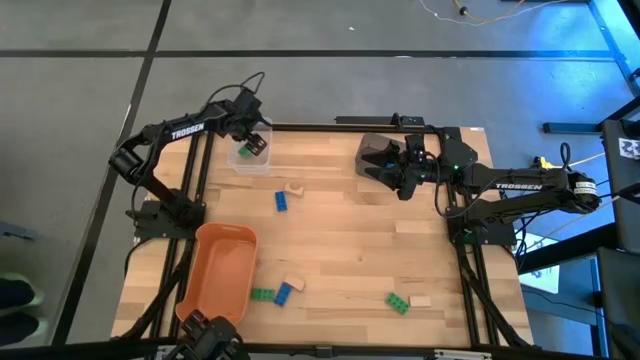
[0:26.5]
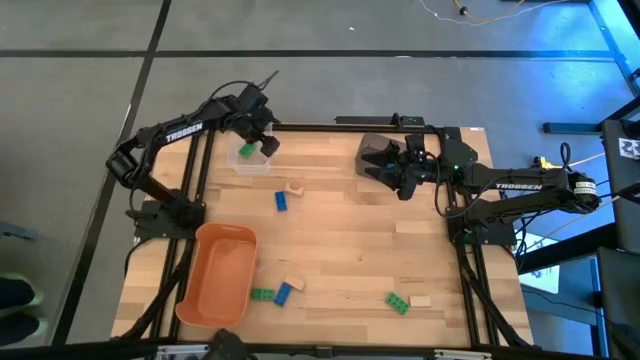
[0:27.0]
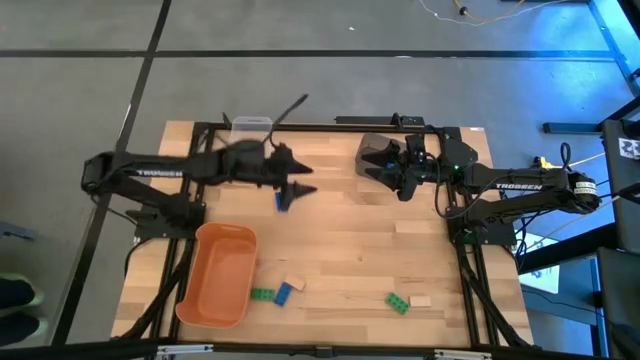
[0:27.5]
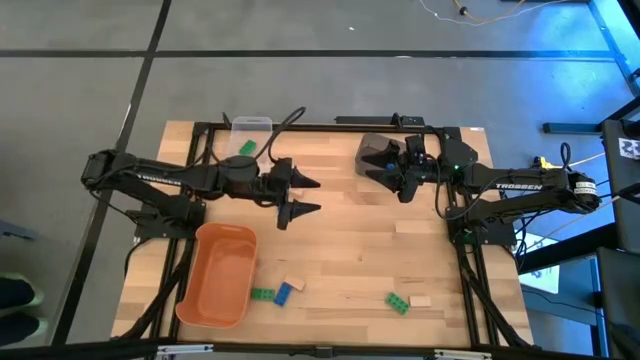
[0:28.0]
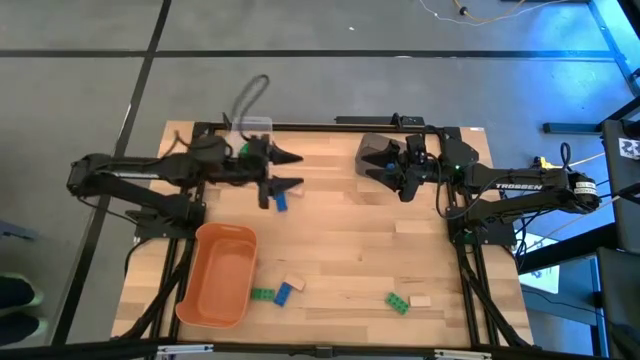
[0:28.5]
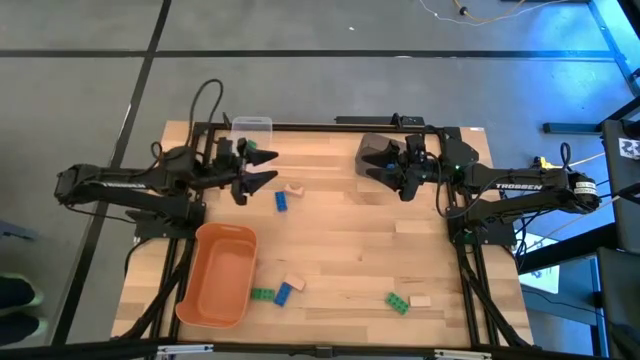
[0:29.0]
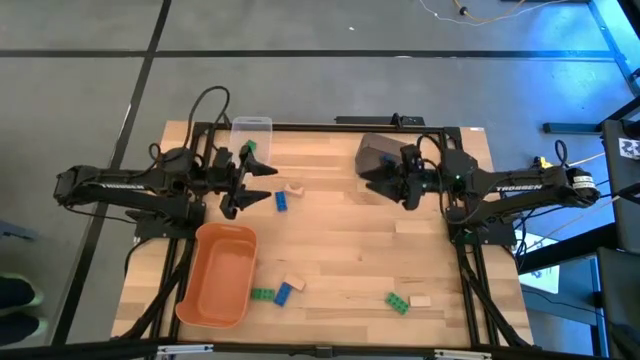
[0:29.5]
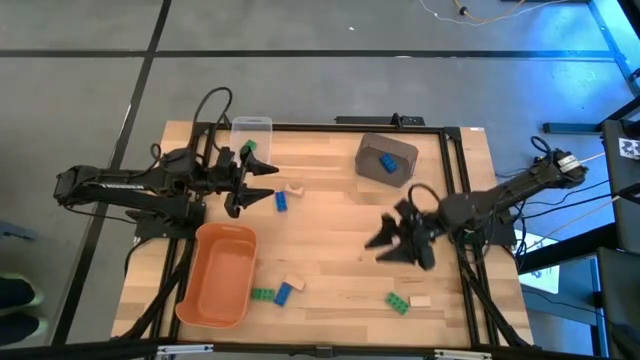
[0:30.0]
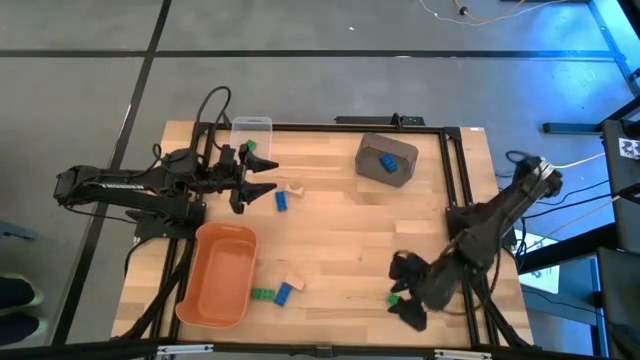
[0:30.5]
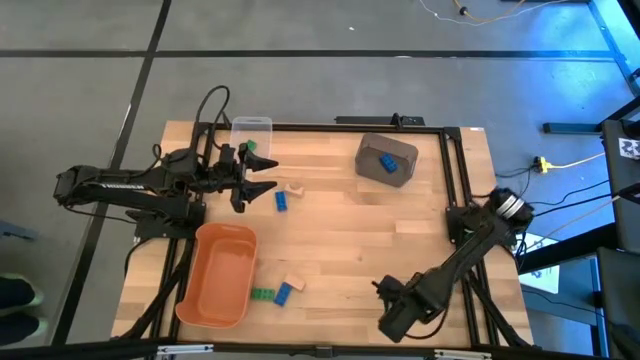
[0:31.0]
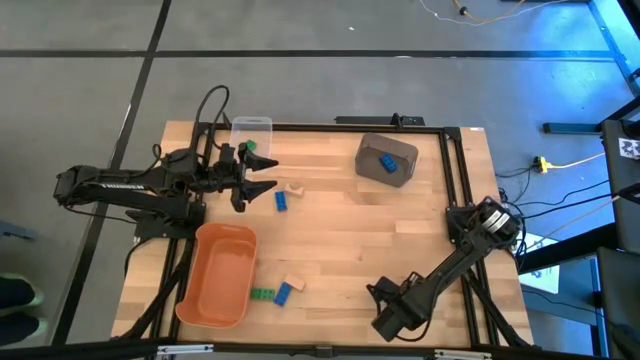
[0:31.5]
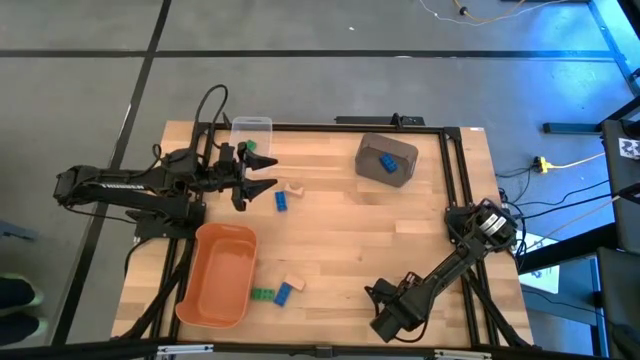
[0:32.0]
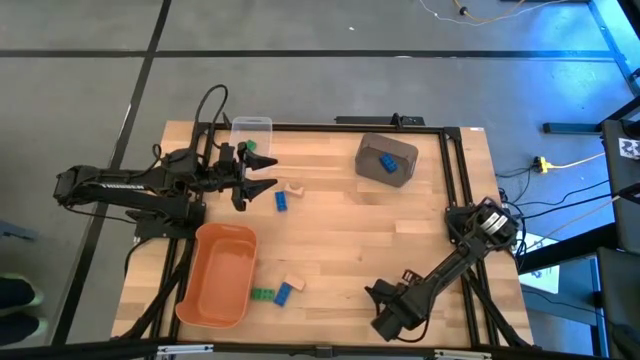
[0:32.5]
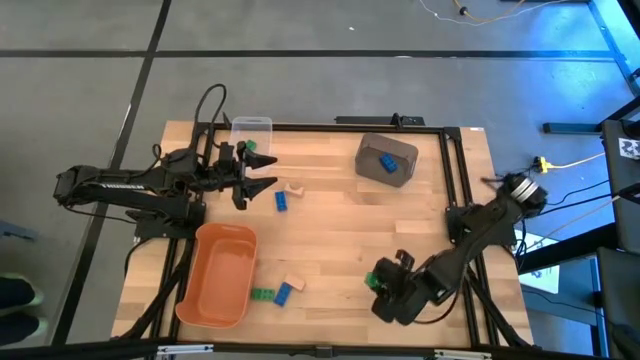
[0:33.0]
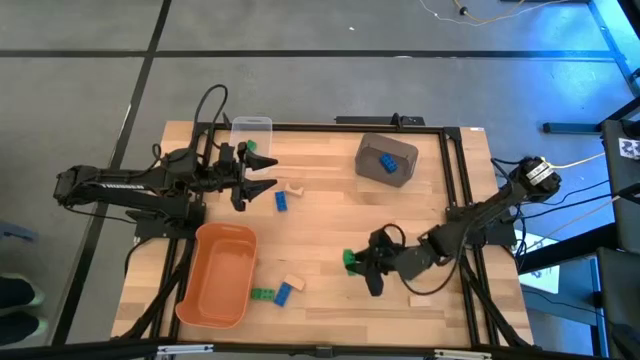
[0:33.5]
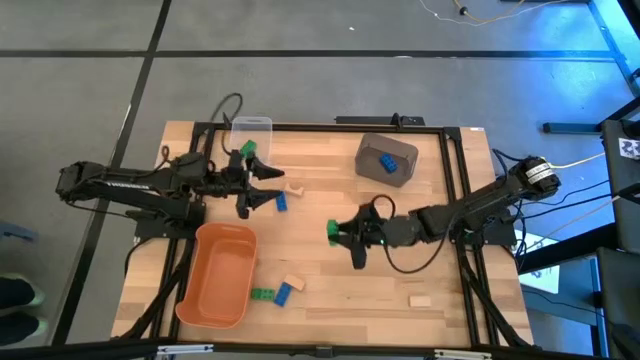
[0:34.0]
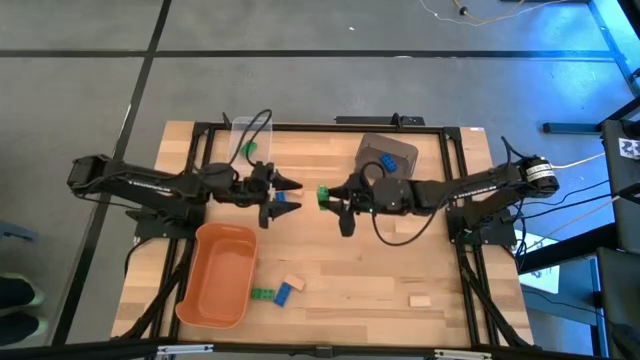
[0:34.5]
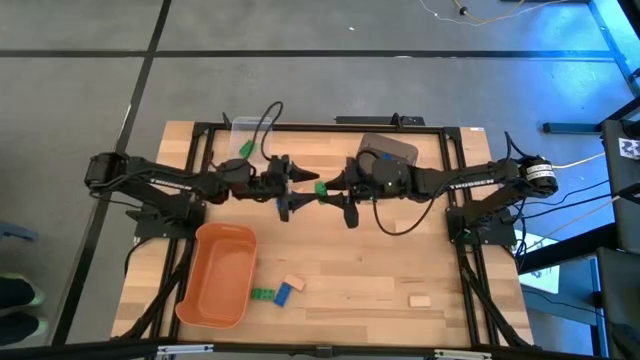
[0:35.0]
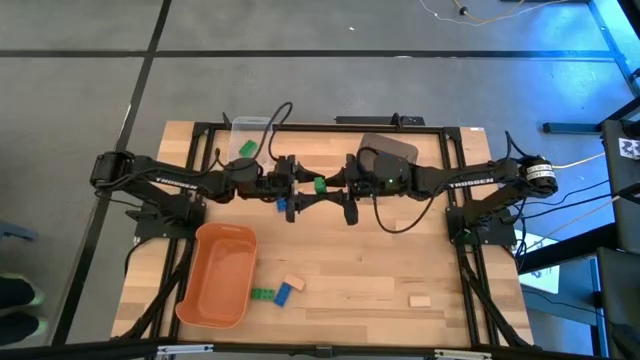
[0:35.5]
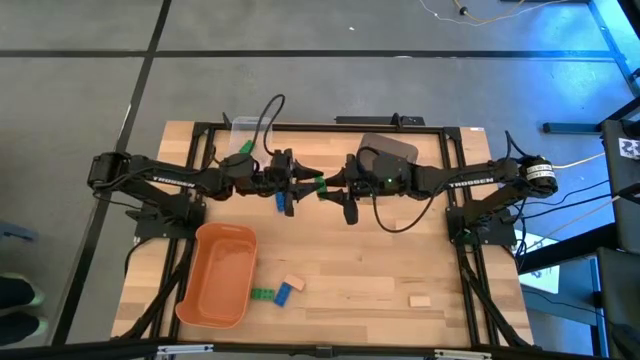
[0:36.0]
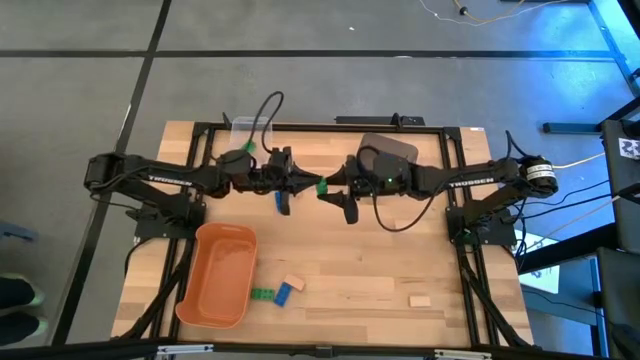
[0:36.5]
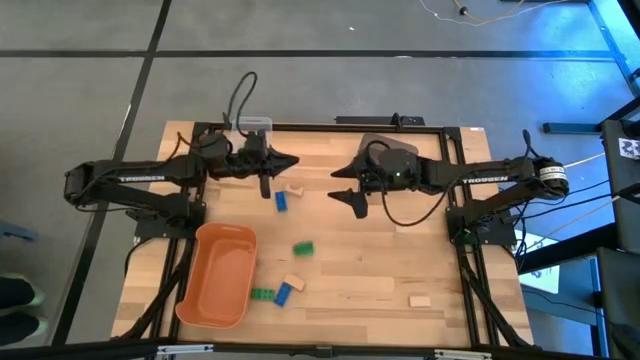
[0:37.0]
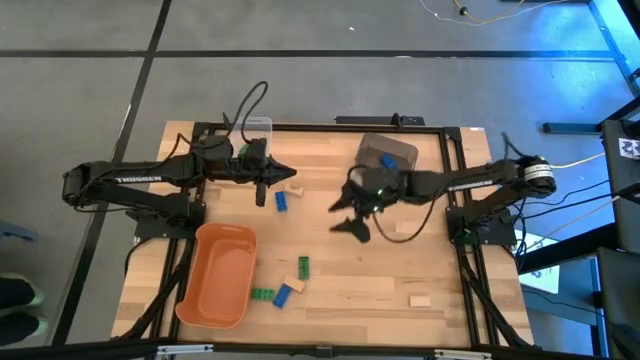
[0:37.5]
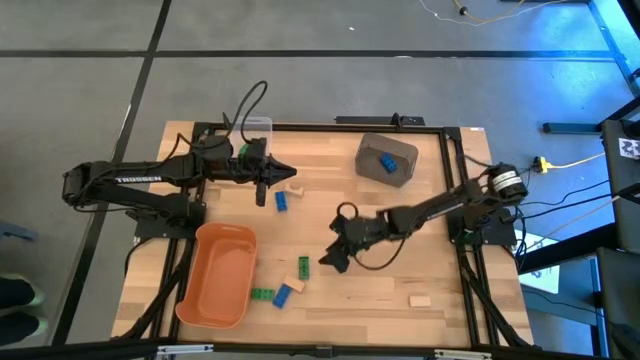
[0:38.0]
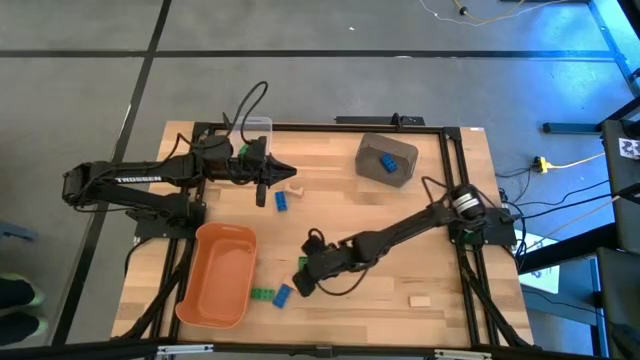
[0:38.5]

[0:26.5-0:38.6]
Task: Sort & place blocks by color
Put the right green game piece into the transparent bin

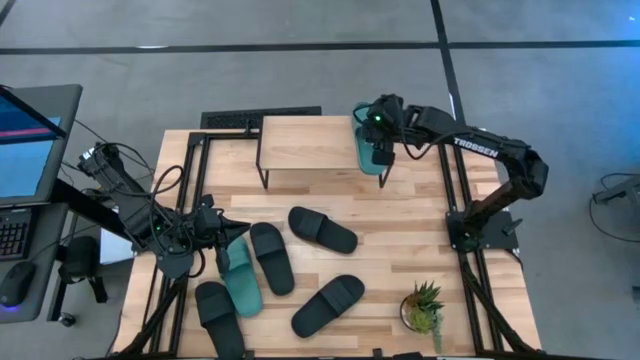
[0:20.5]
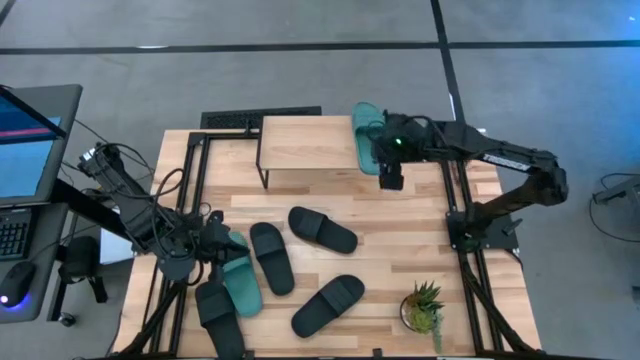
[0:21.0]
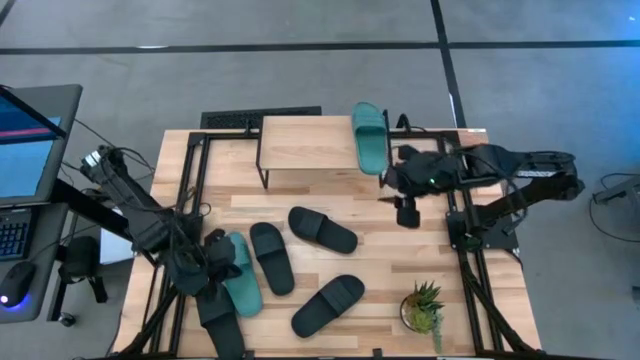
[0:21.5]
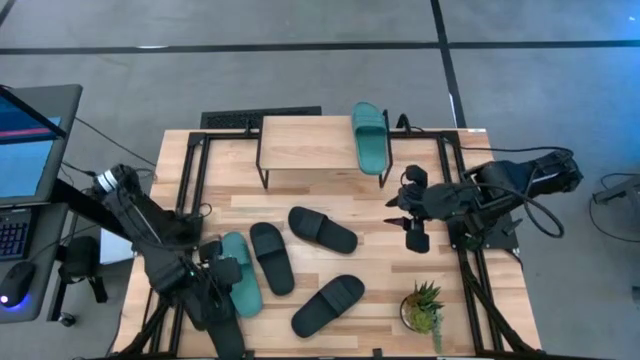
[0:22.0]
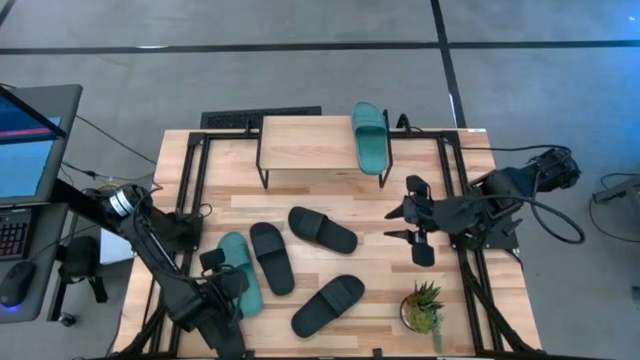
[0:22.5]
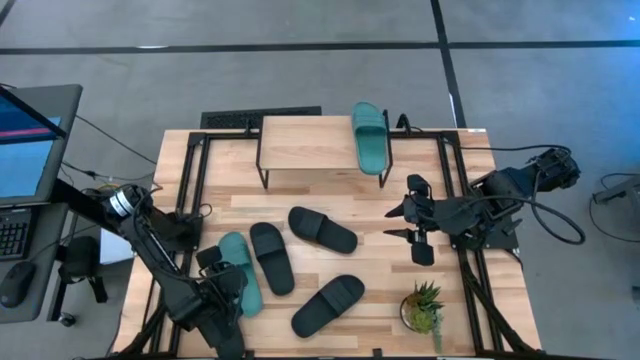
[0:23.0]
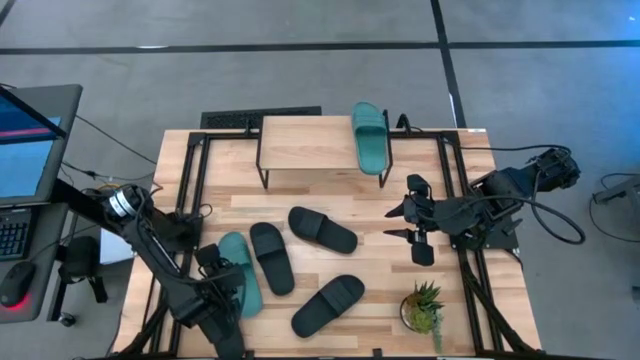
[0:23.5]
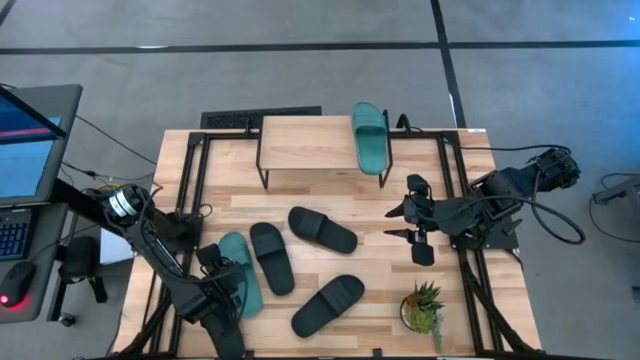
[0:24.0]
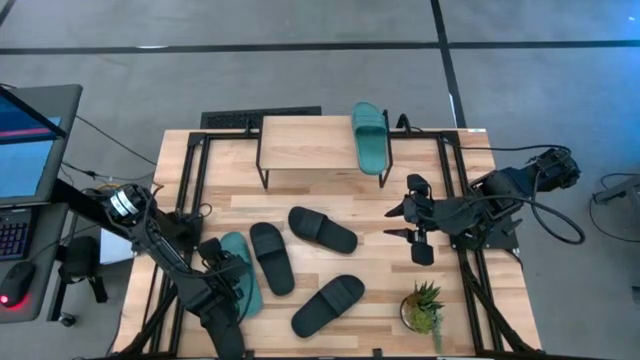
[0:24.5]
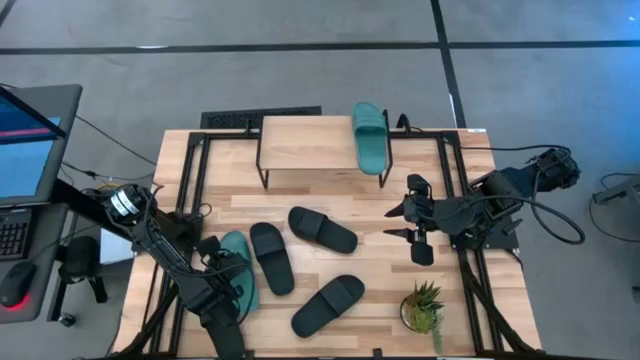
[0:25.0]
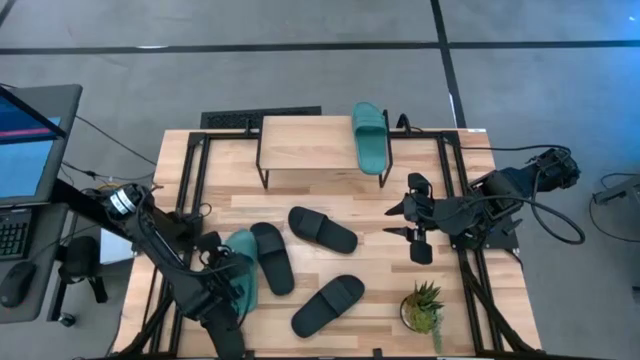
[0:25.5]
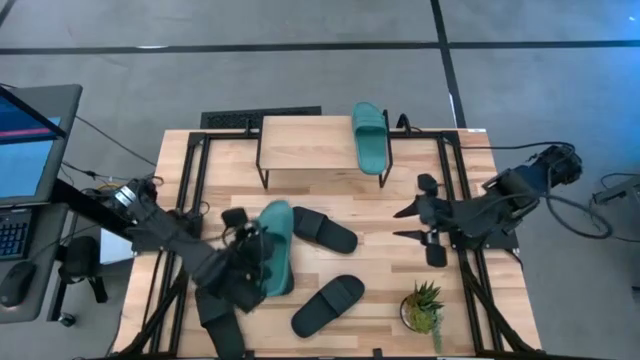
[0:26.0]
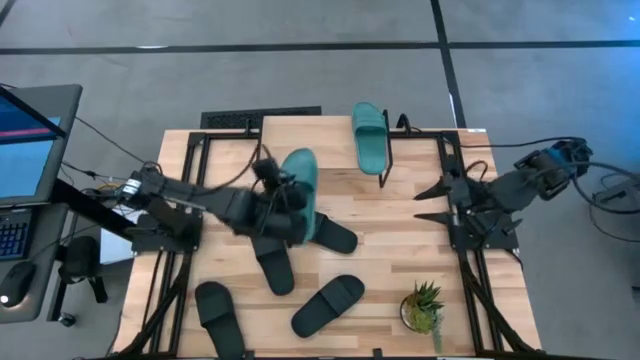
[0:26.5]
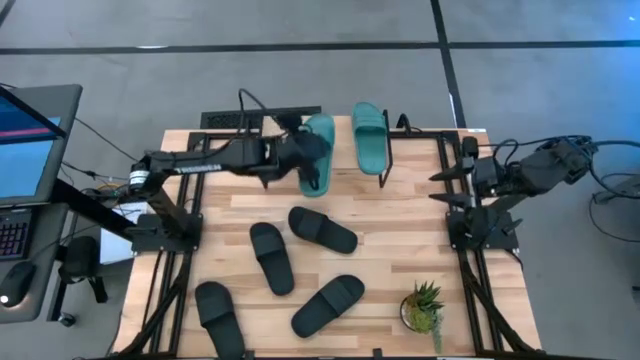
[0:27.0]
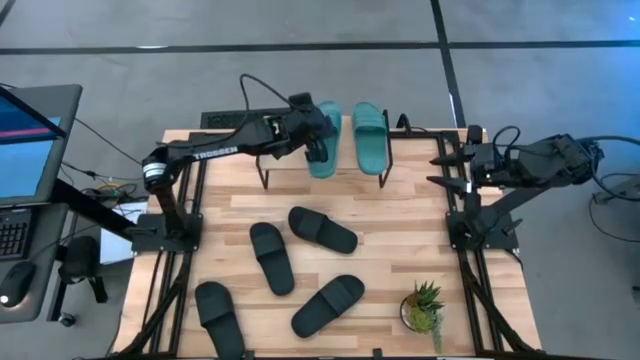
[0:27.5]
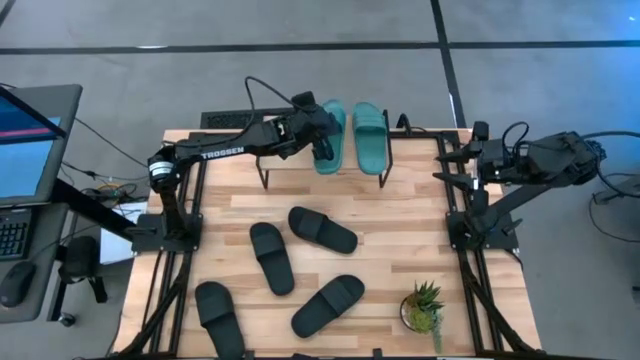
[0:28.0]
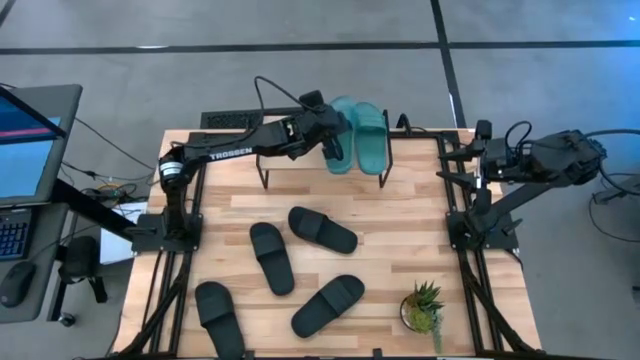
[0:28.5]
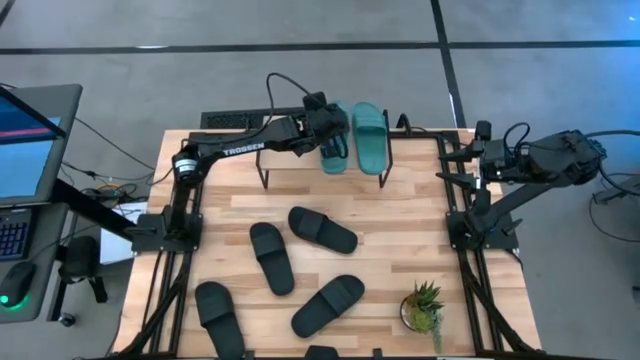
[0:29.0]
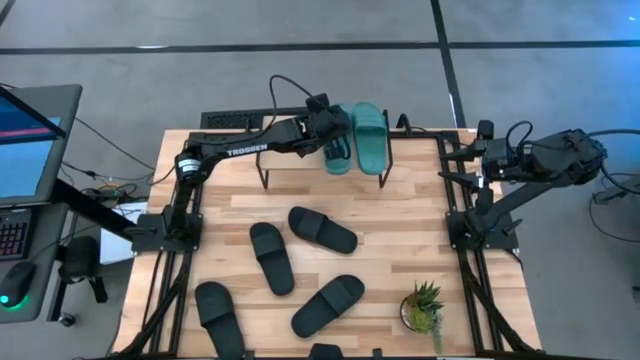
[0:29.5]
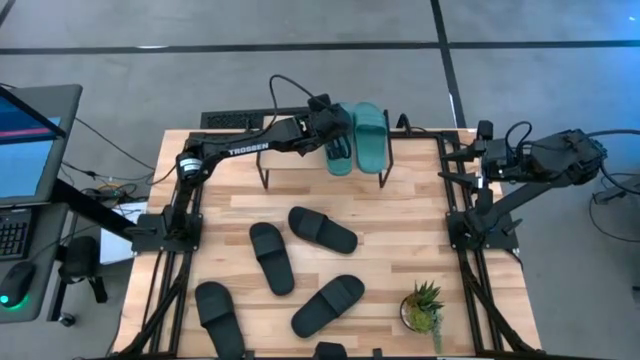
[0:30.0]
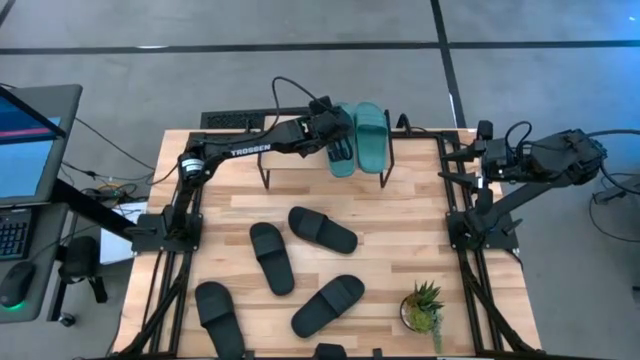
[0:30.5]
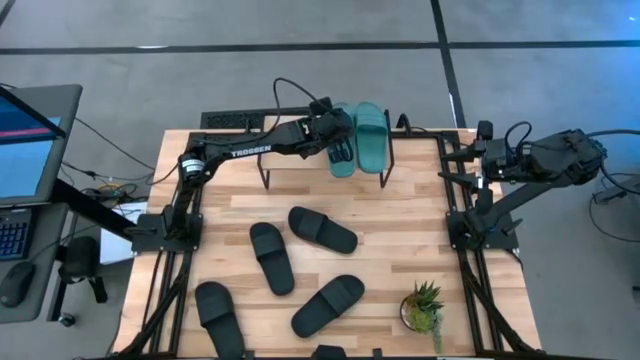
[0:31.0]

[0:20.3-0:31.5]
Task: Pick and place slides into the shelf
Put the blue slipper on the shelf
